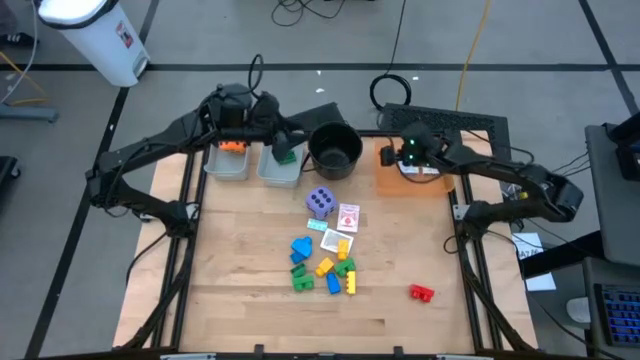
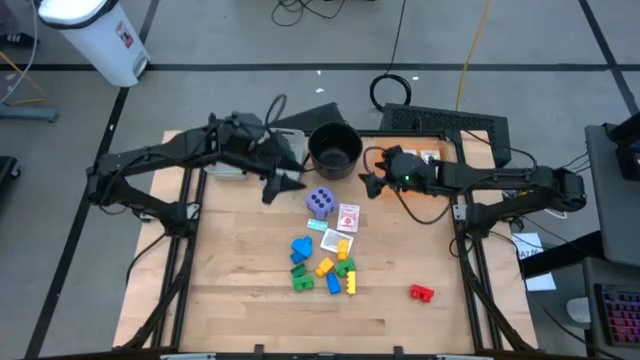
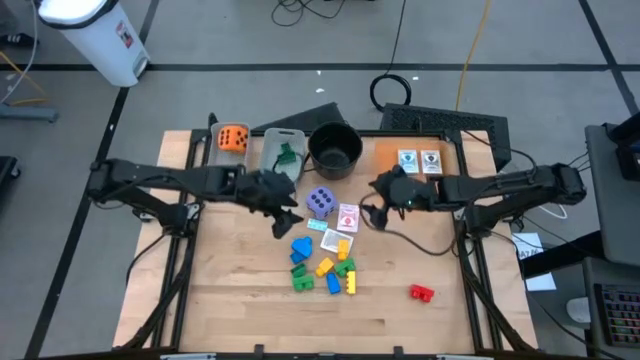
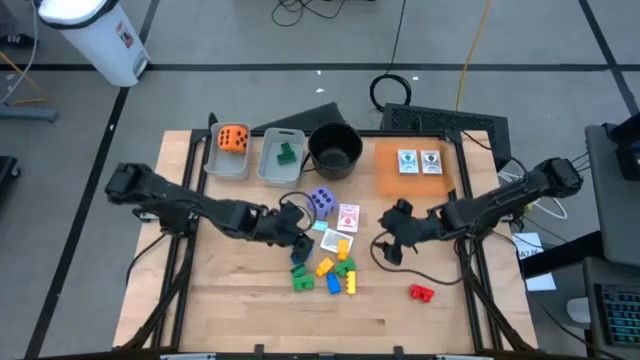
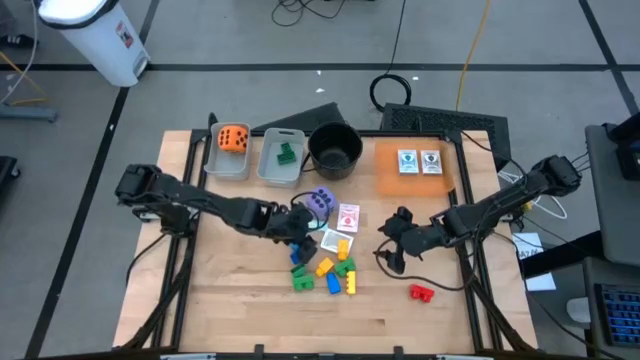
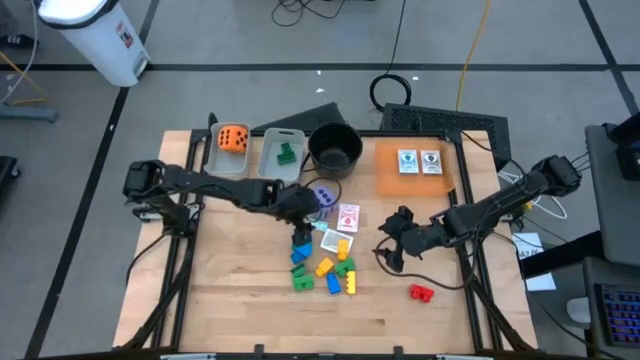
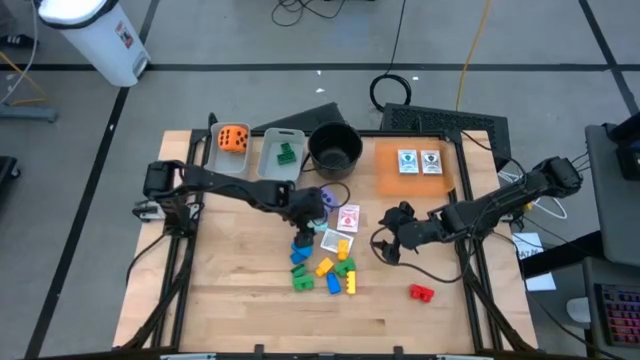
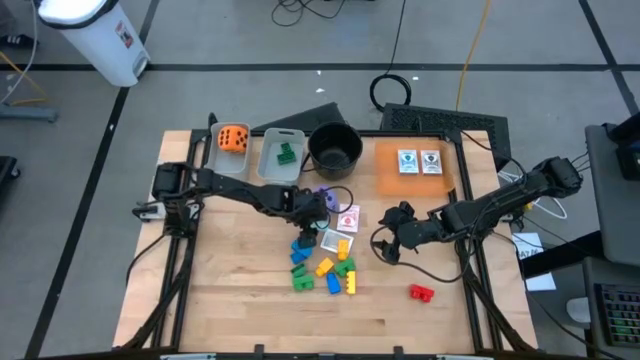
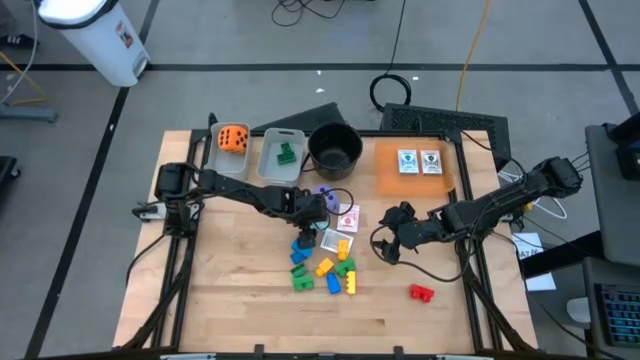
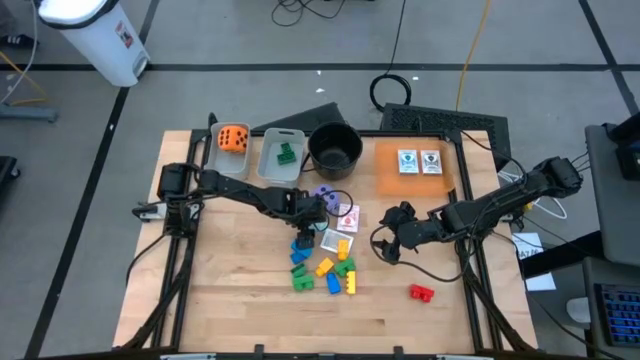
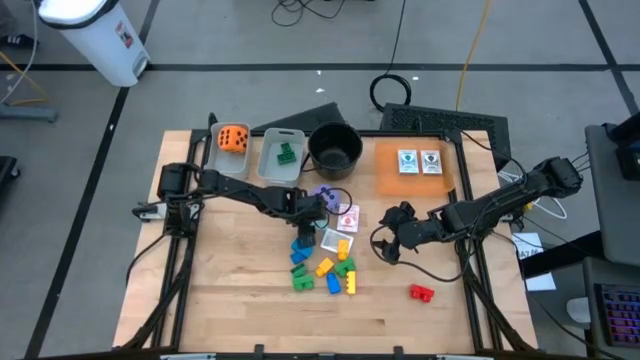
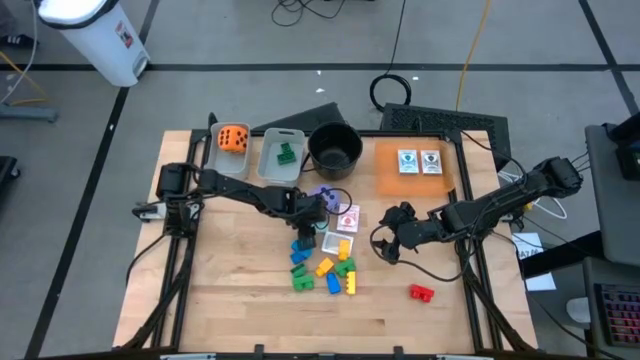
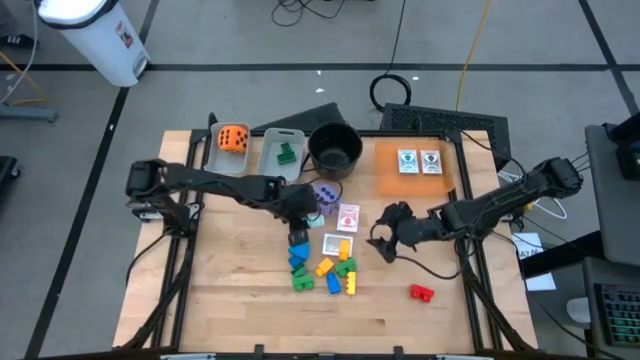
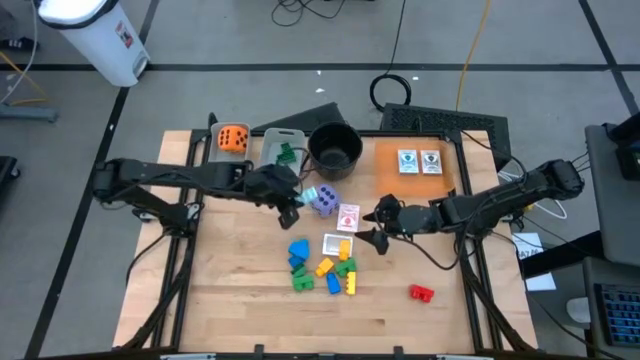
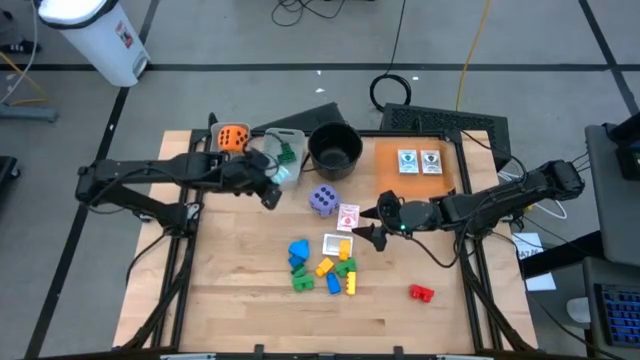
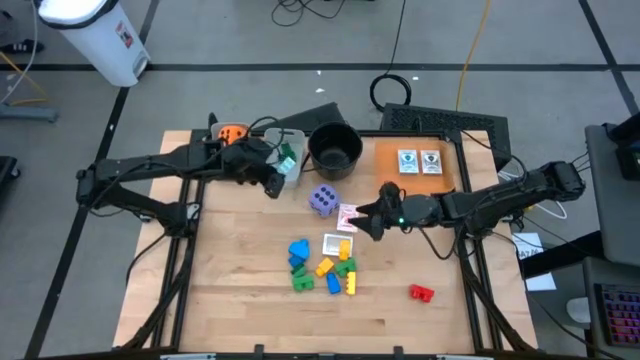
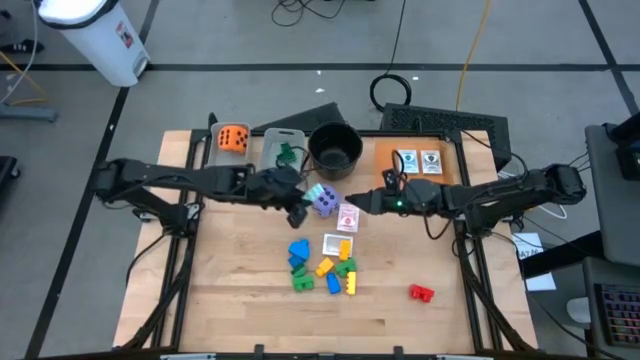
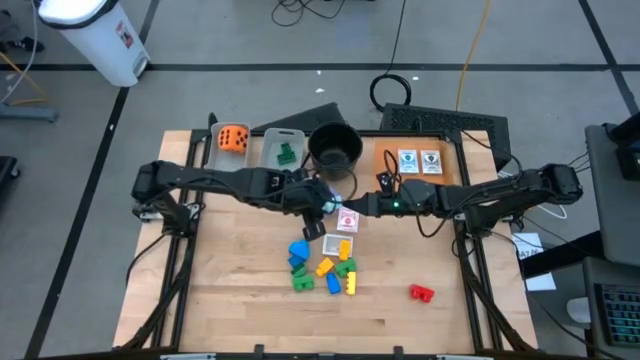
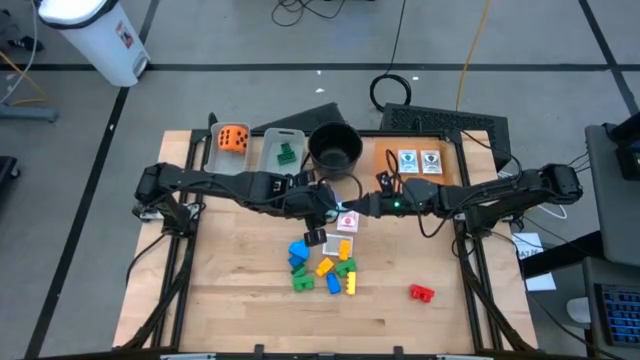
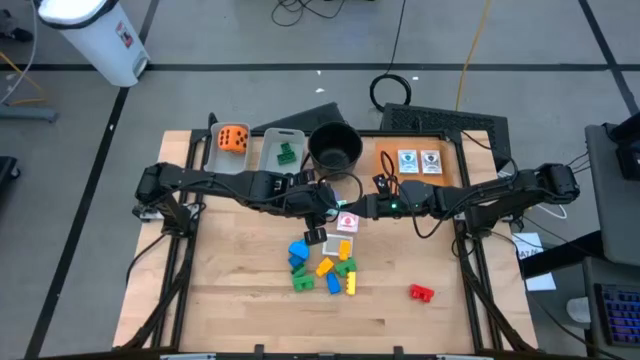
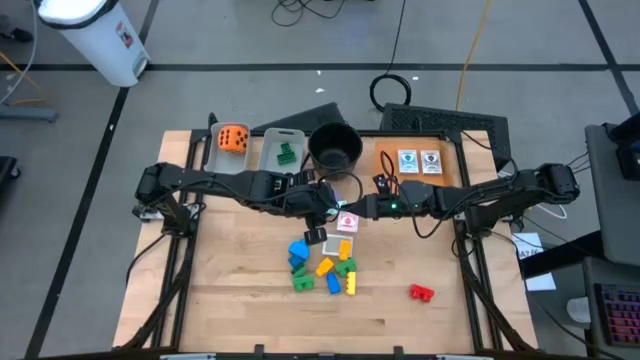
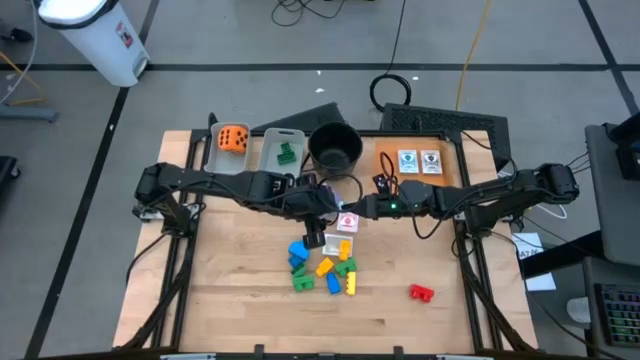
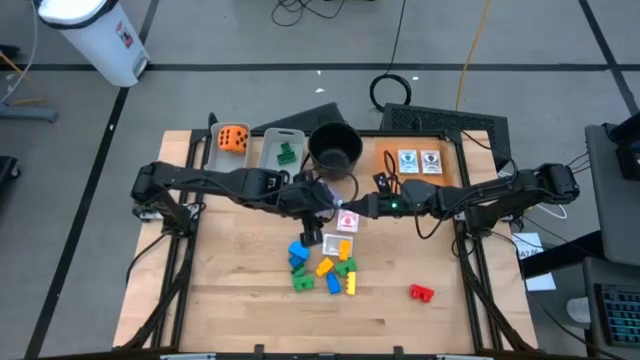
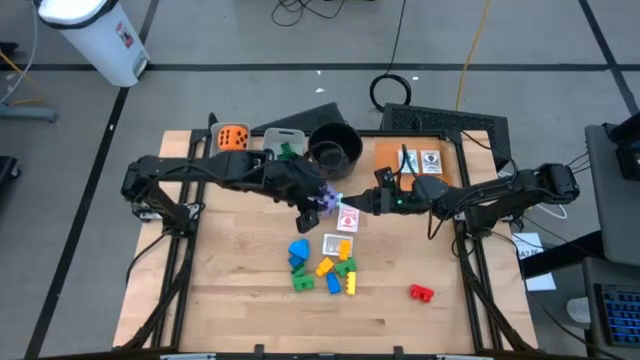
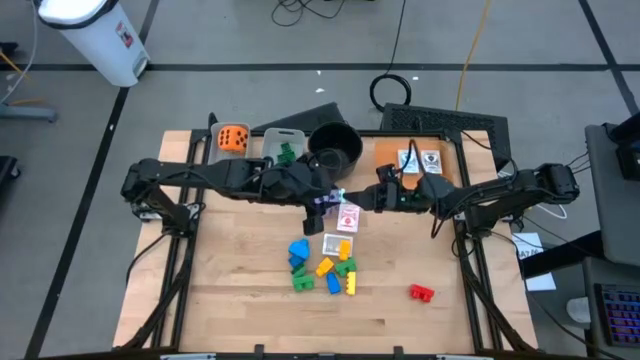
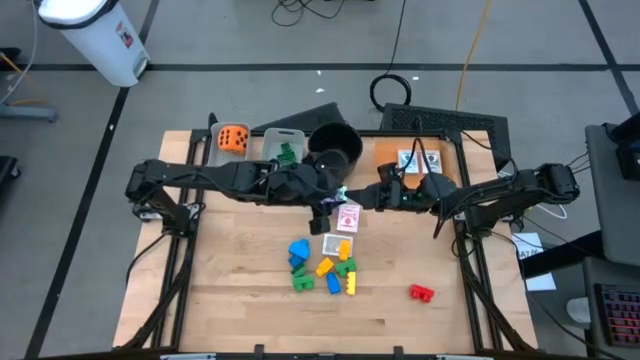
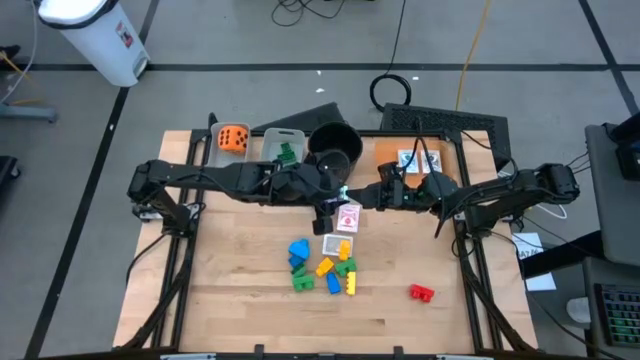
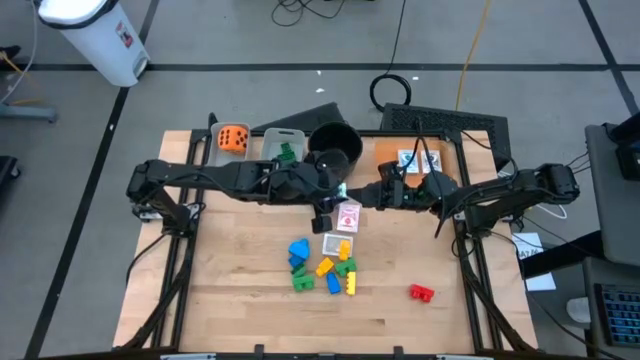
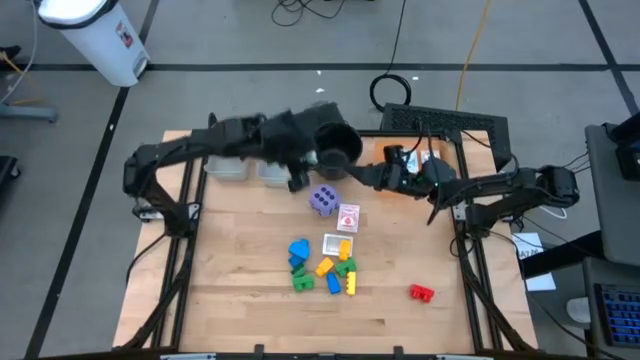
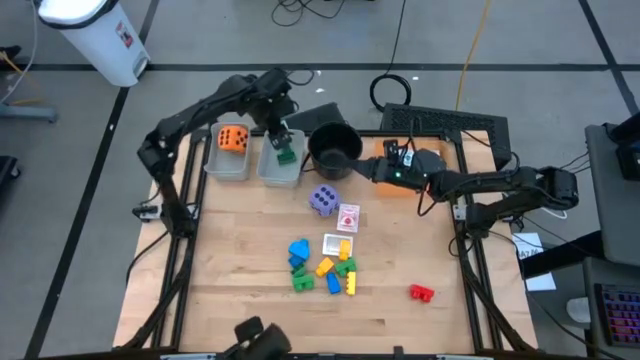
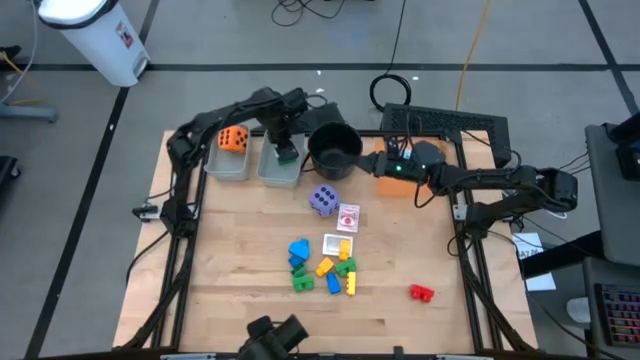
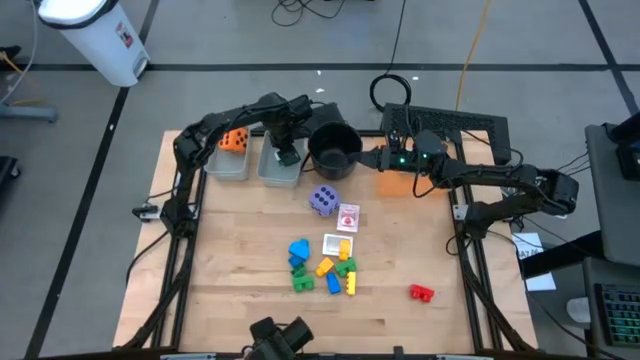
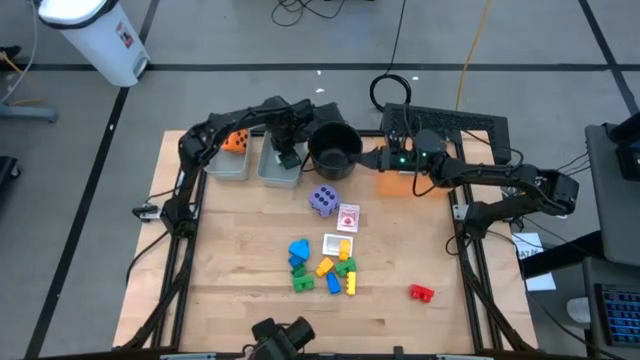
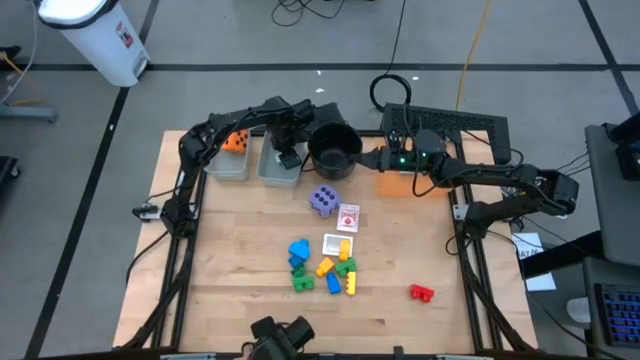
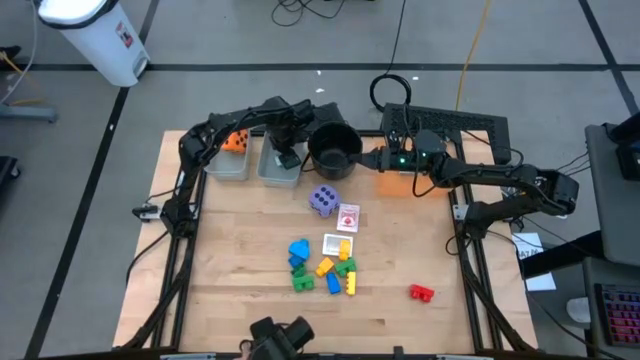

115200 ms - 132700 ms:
Task: Pick & Place Toys
Put the light blue game piece into the right gray bin

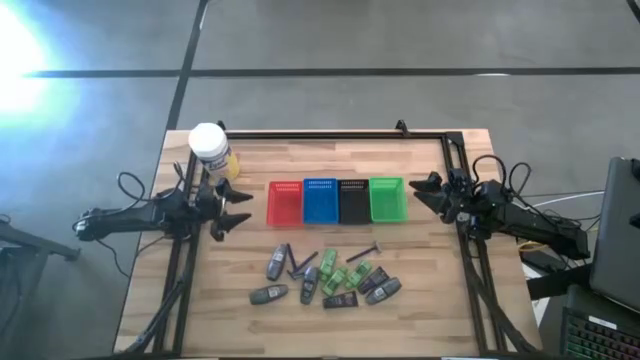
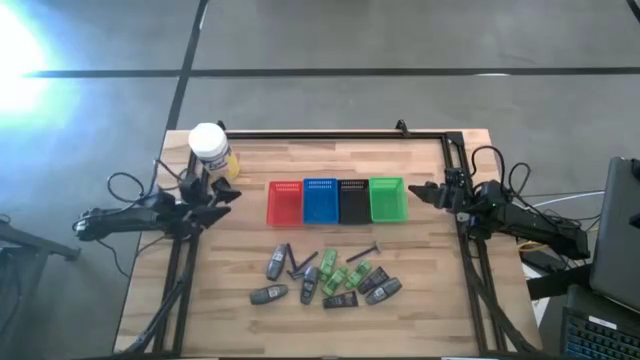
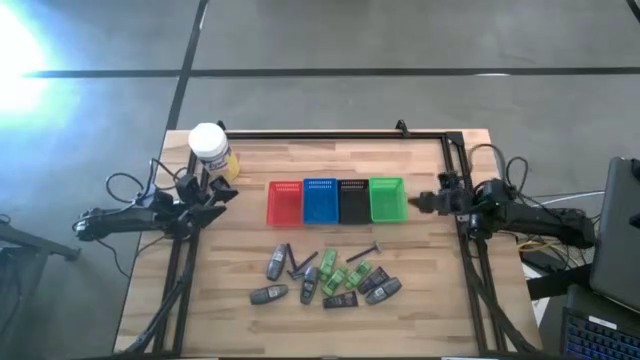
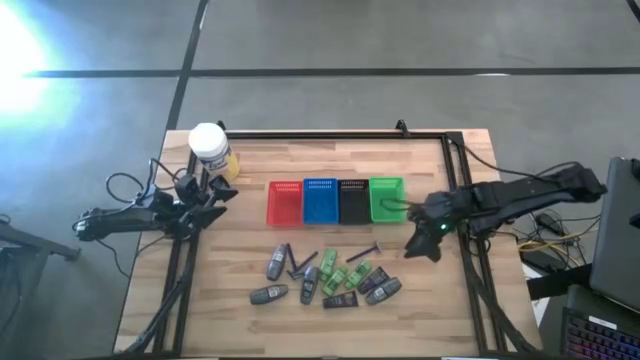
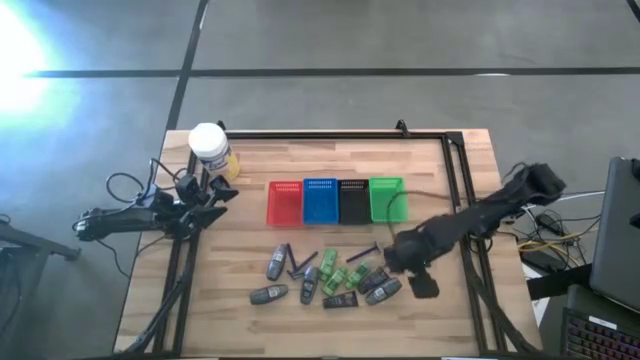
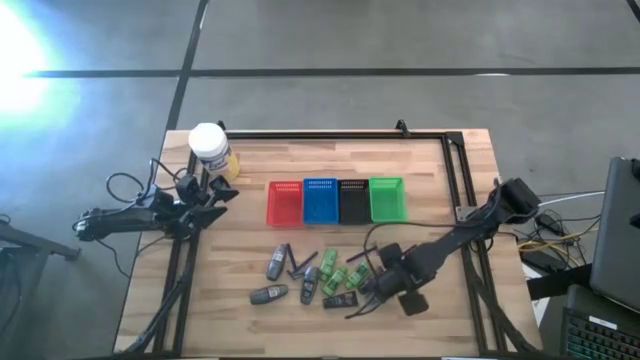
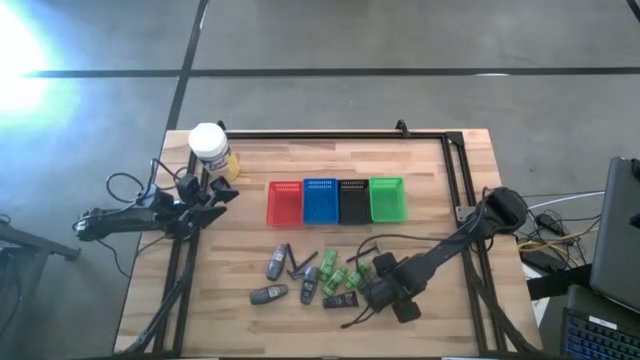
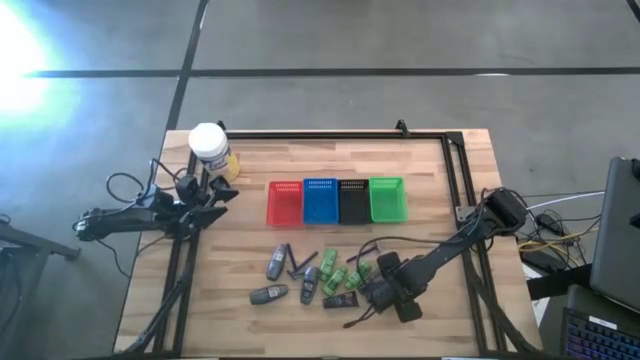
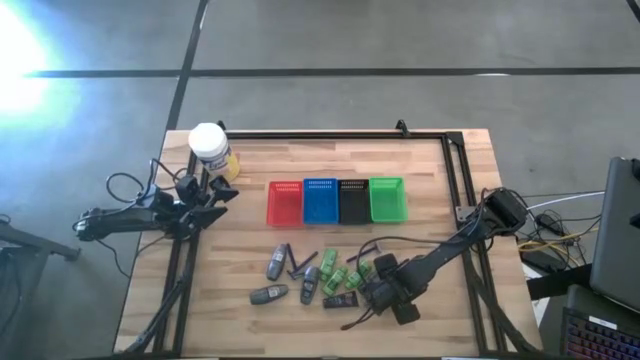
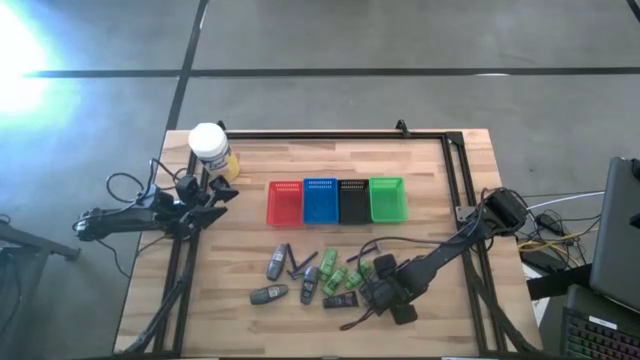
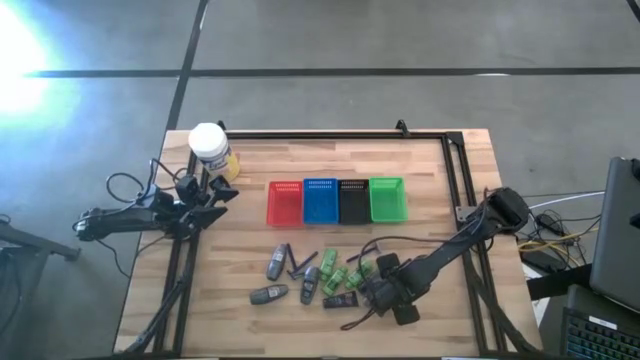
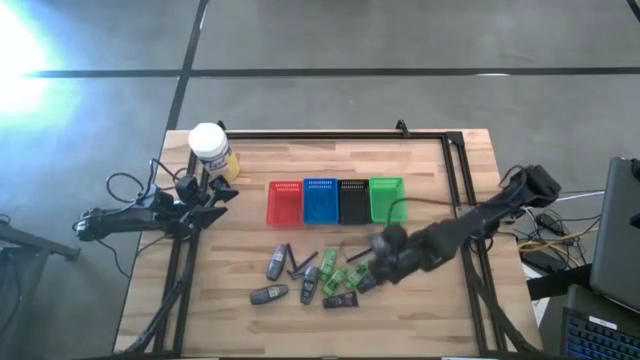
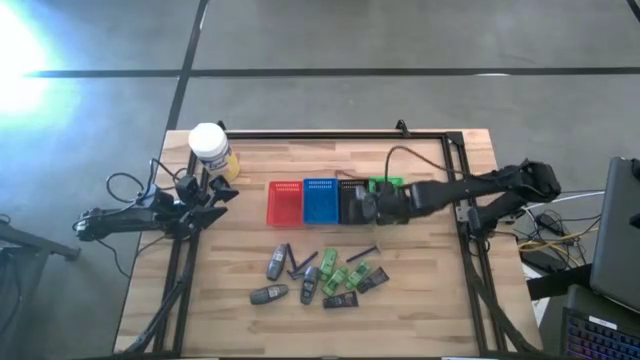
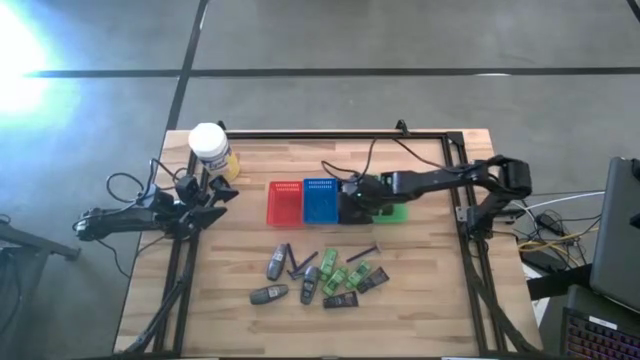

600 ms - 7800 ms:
Task: Pick & Place Travel size toiletries
Put the gray deodorant into the black bin
